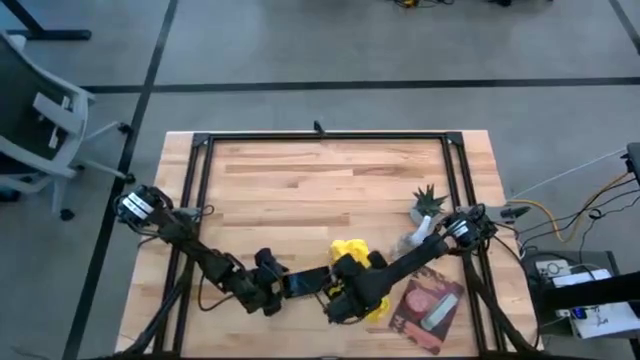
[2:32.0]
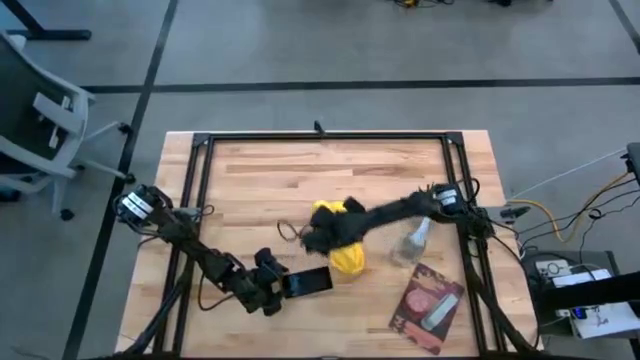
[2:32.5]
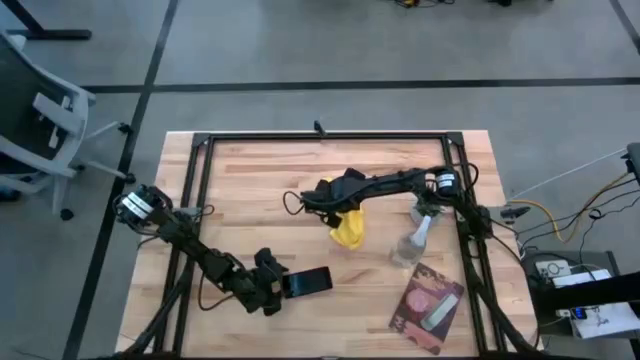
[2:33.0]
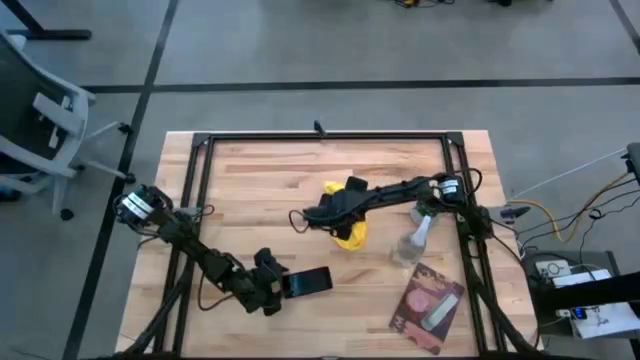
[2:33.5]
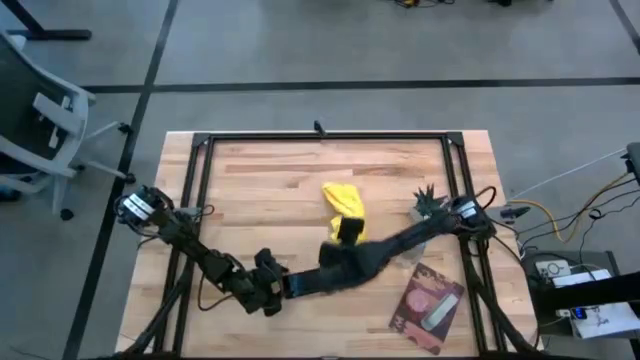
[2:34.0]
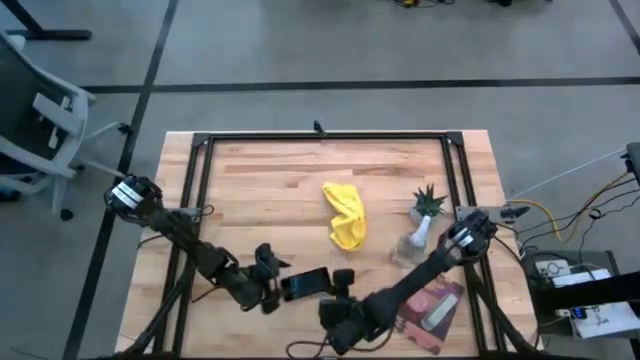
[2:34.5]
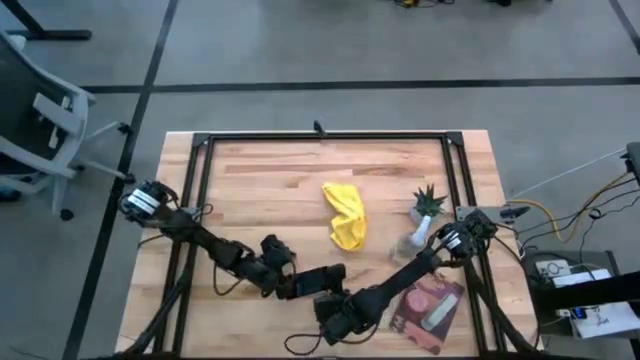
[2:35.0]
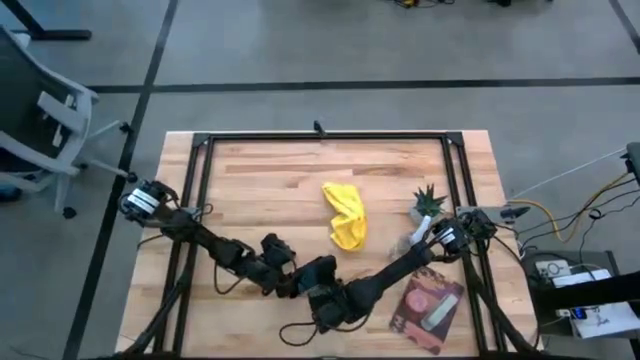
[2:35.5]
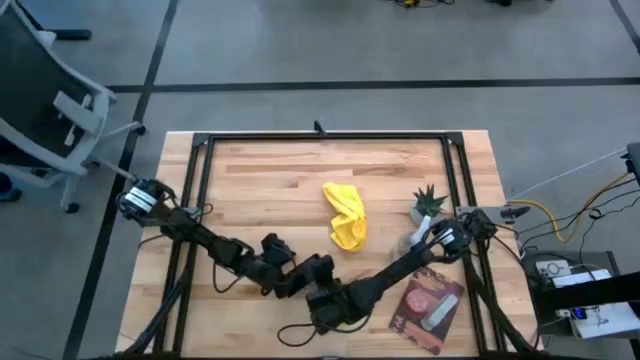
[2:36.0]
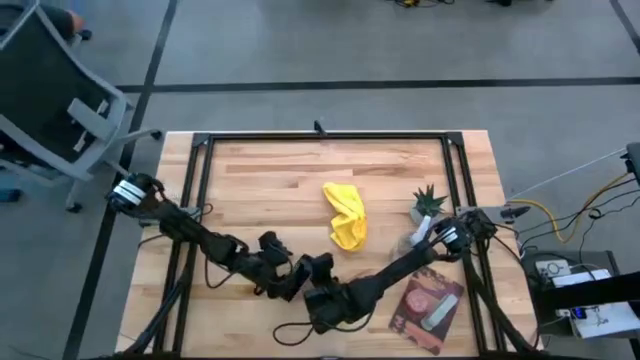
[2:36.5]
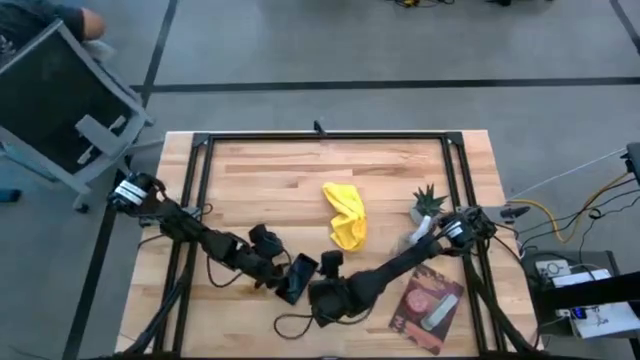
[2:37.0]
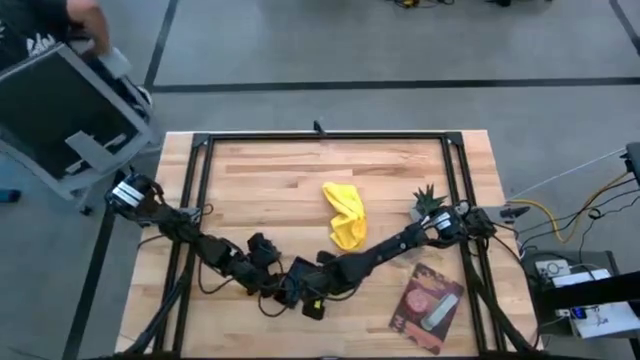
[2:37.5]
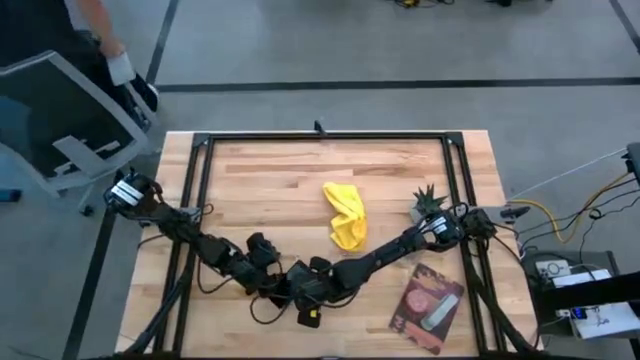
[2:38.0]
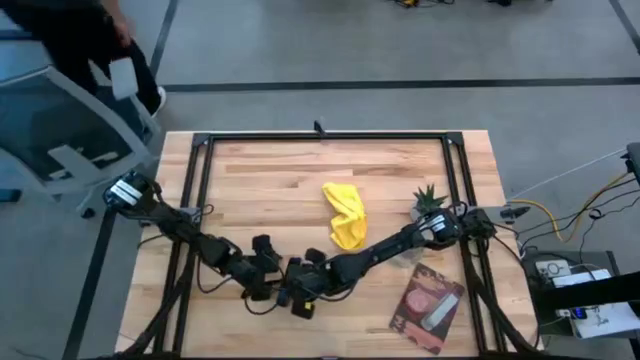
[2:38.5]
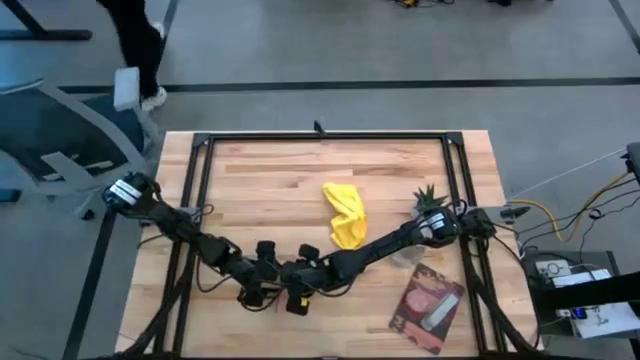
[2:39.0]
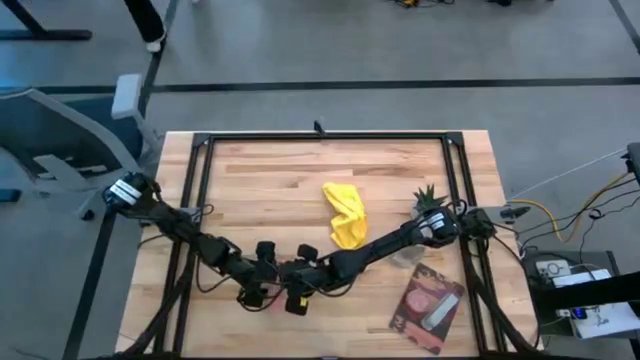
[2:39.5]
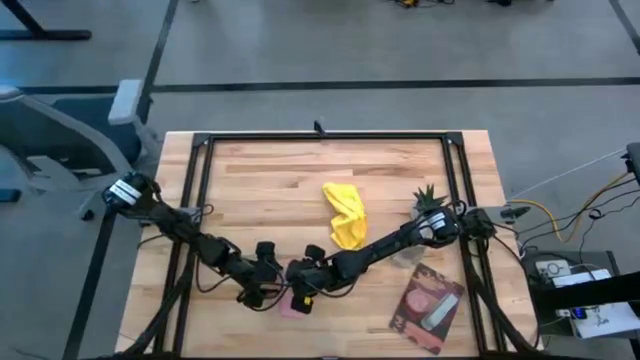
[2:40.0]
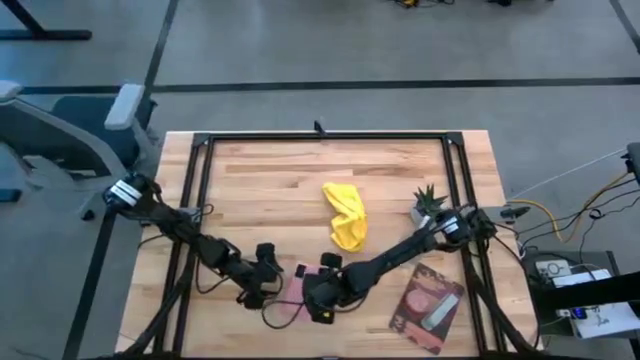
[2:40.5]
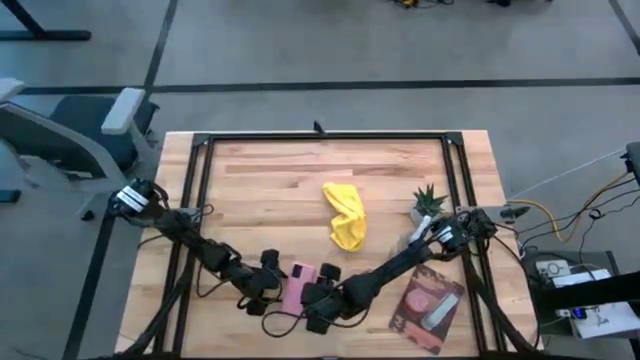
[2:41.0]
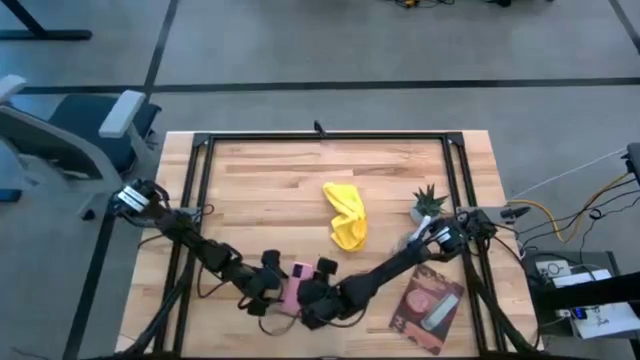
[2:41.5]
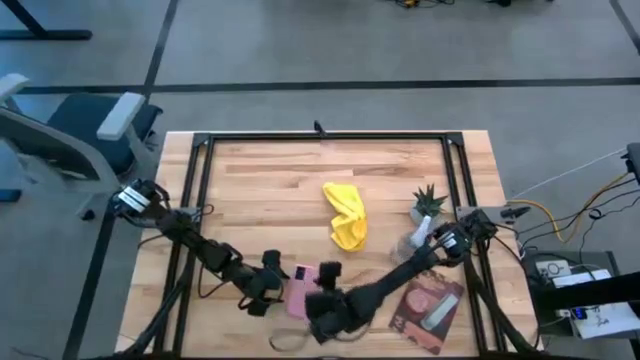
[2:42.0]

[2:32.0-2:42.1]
Task: Apply microfiber cloth
Move the pink cellphone to the left of the table

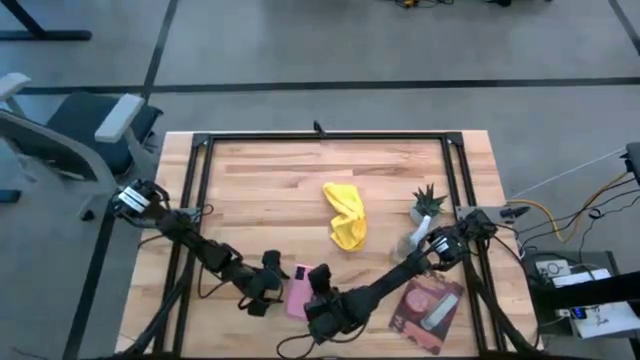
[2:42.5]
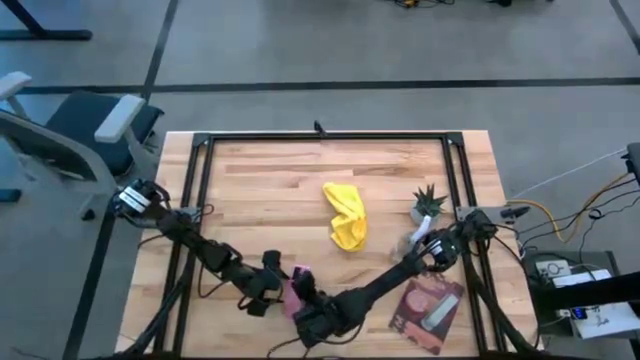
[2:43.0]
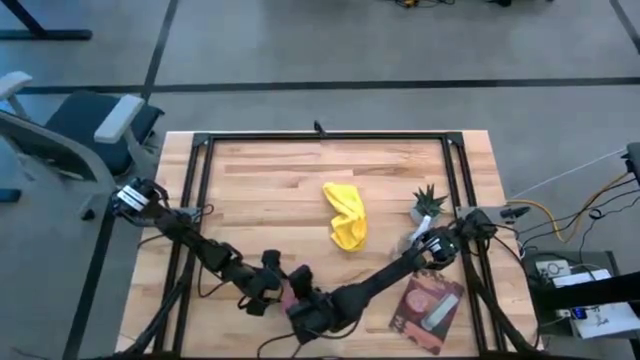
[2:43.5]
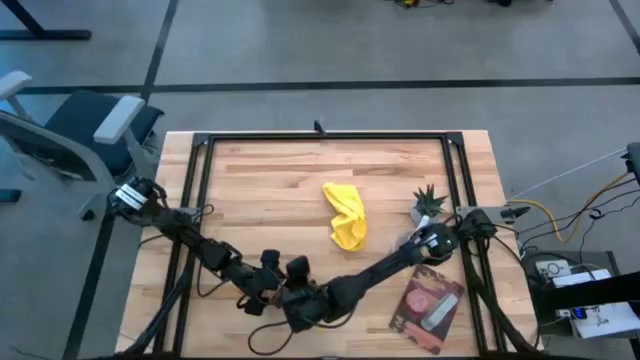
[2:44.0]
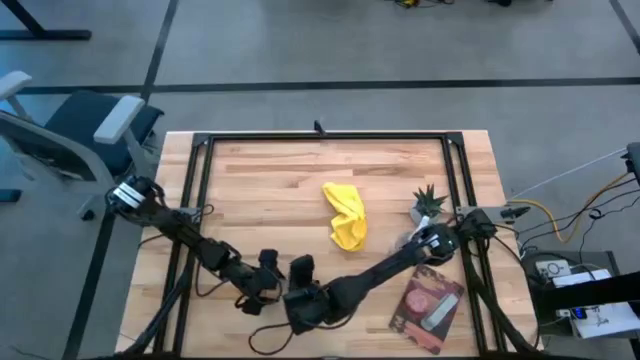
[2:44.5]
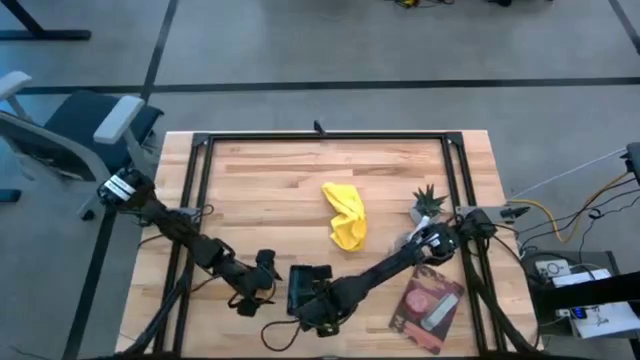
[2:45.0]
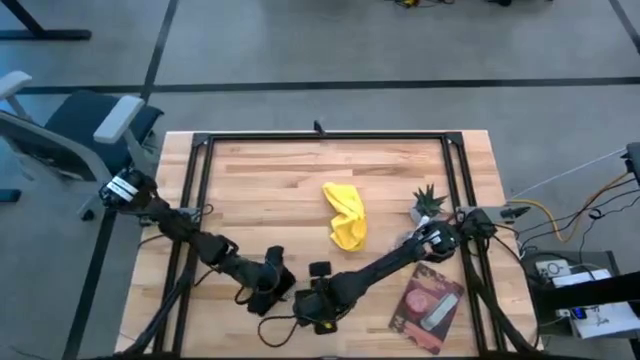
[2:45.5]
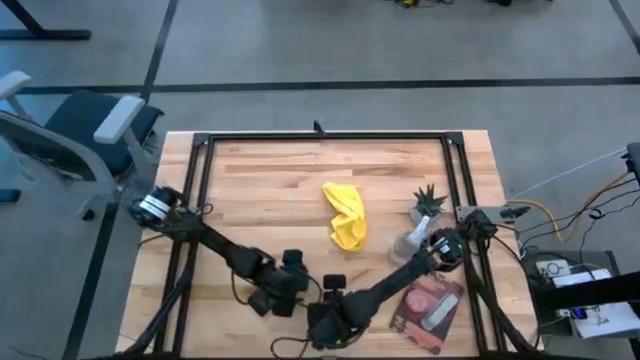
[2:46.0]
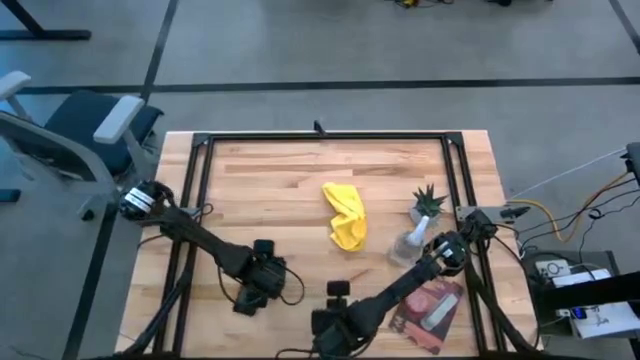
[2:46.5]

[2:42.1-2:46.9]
Move the pink cellphone to the left of the table

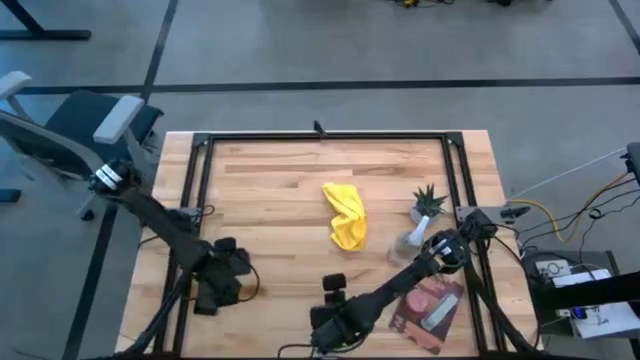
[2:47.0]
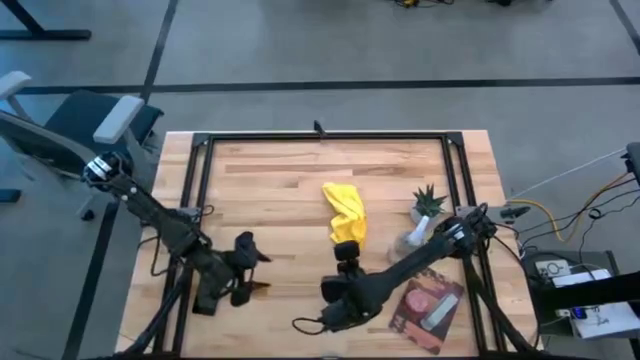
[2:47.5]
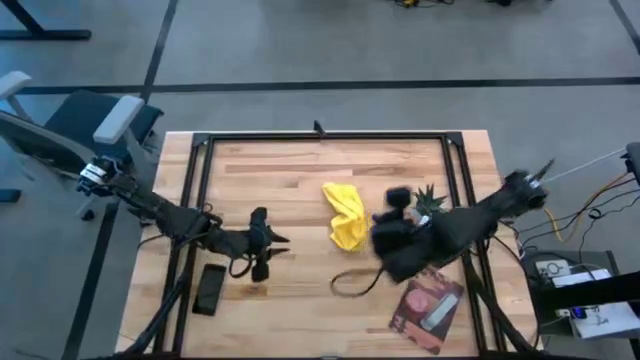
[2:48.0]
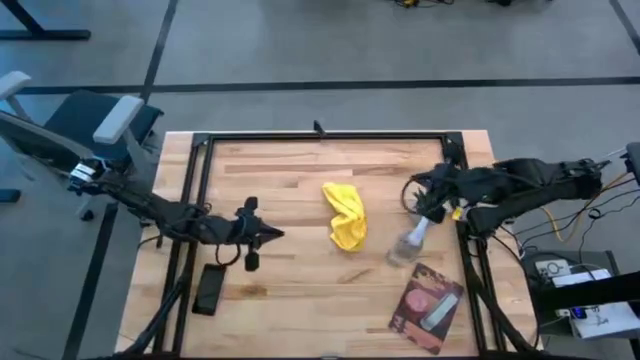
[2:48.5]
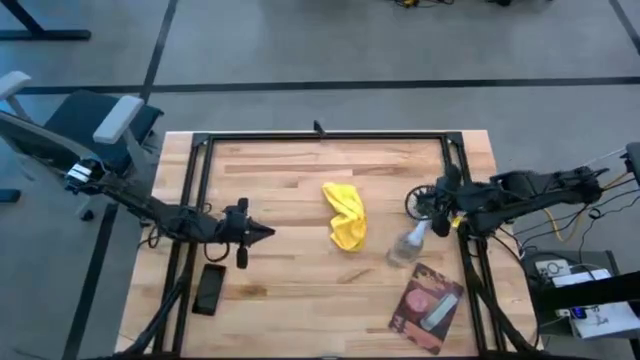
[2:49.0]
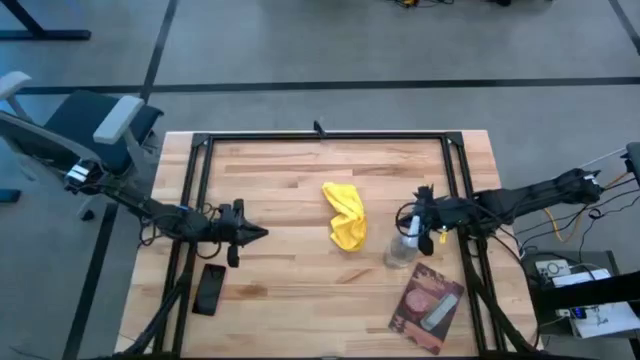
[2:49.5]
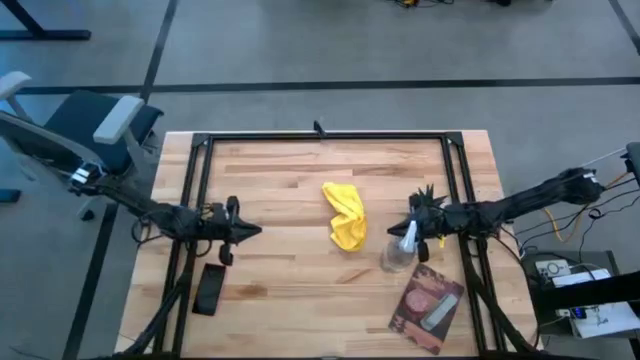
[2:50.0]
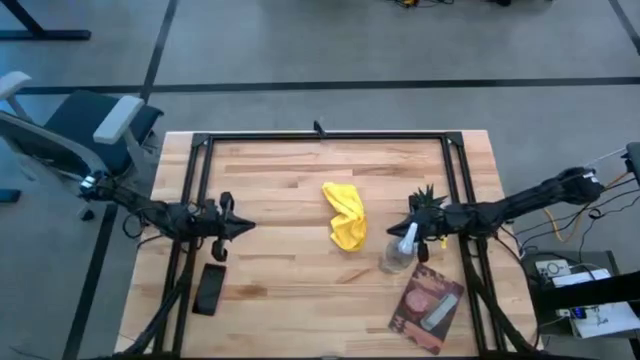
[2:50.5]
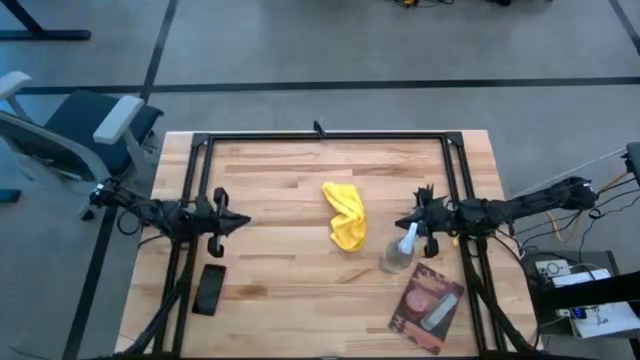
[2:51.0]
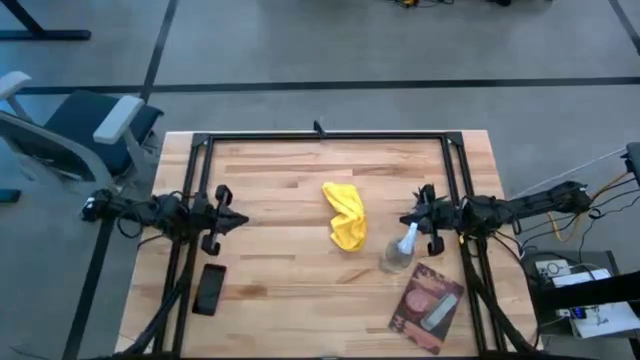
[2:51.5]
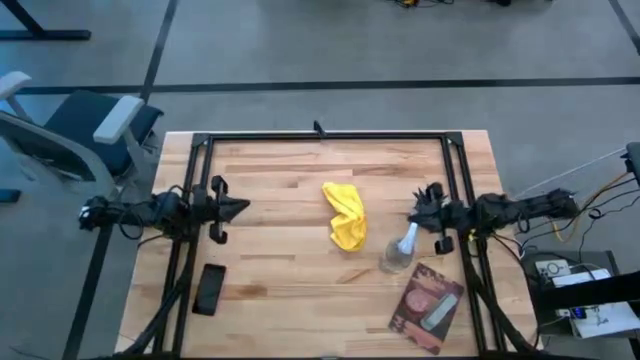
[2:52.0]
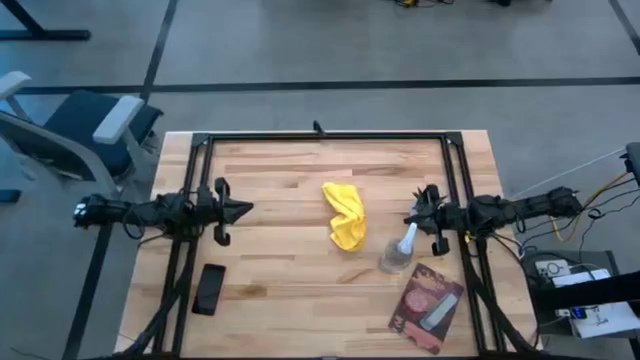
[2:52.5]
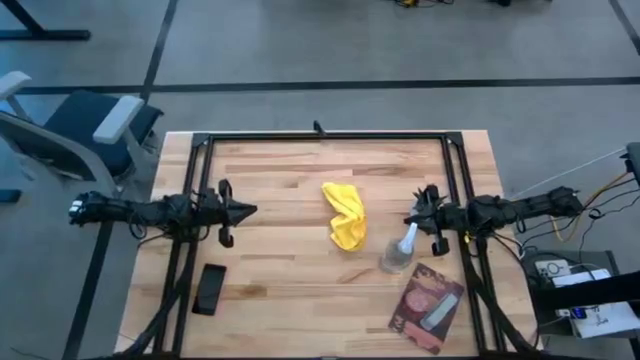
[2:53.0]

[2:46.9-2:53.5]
Return to Home Position
